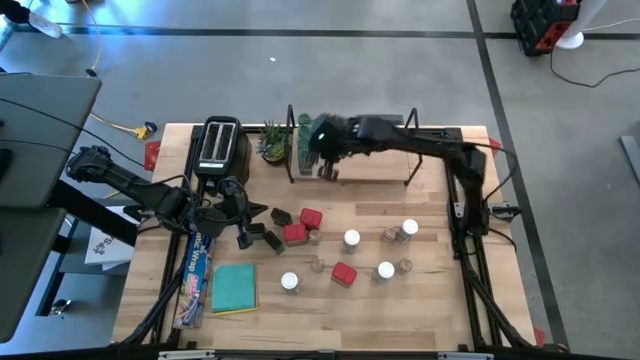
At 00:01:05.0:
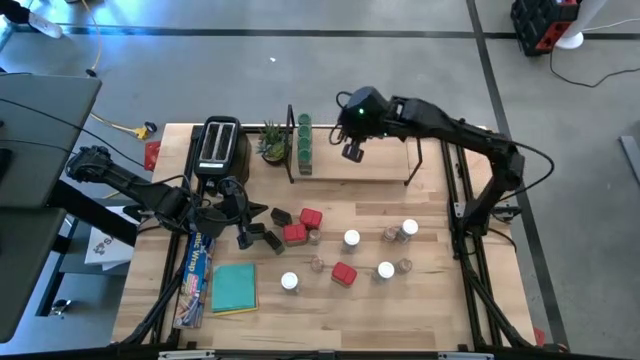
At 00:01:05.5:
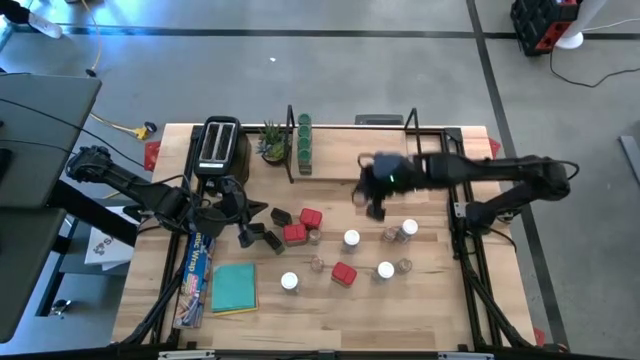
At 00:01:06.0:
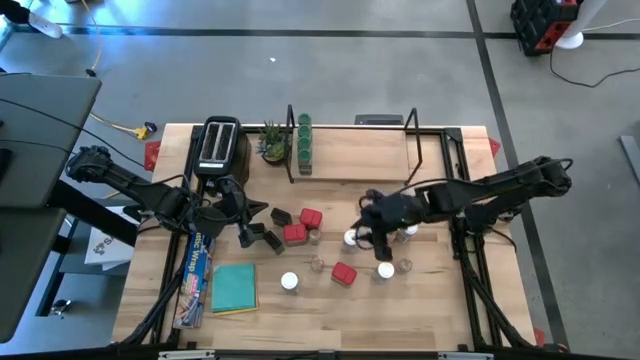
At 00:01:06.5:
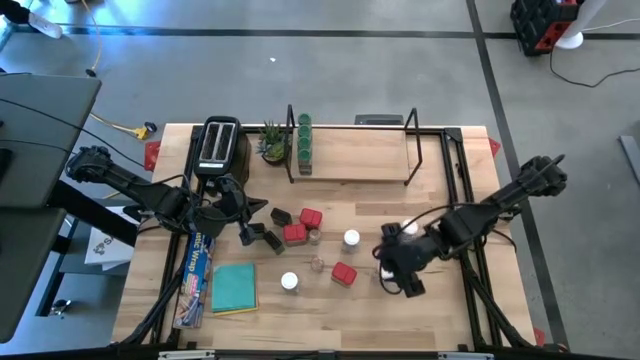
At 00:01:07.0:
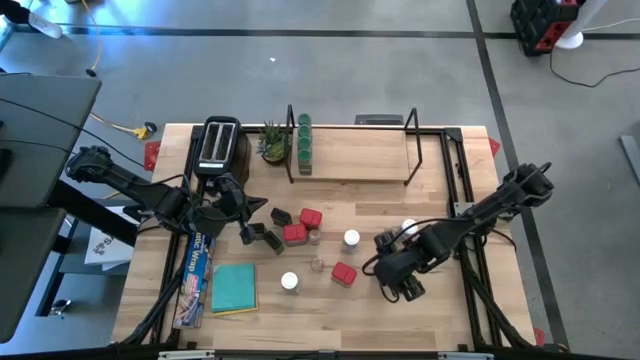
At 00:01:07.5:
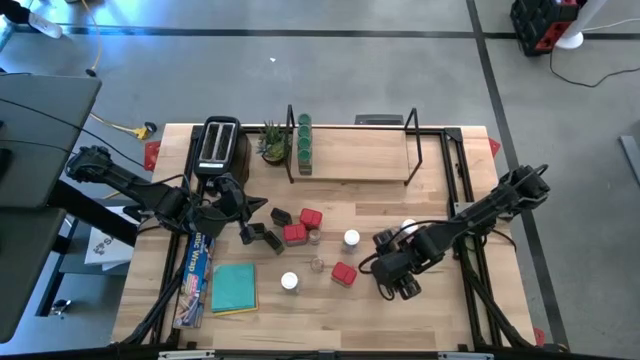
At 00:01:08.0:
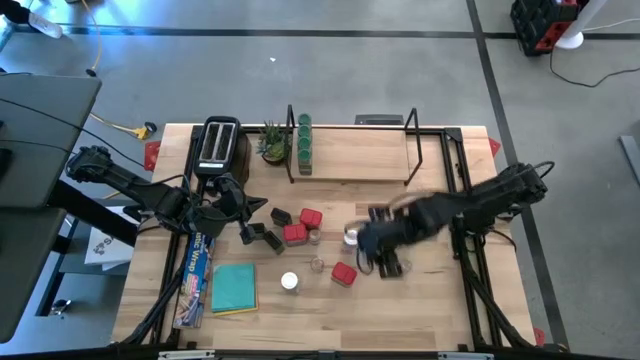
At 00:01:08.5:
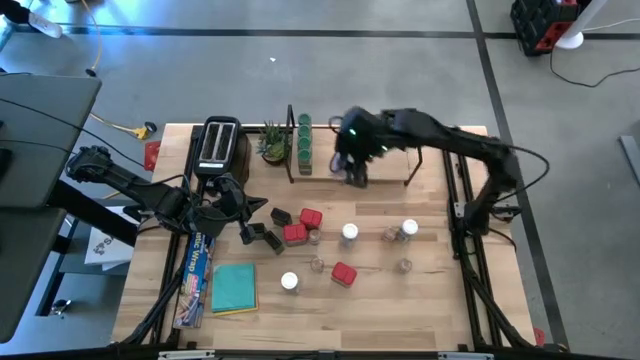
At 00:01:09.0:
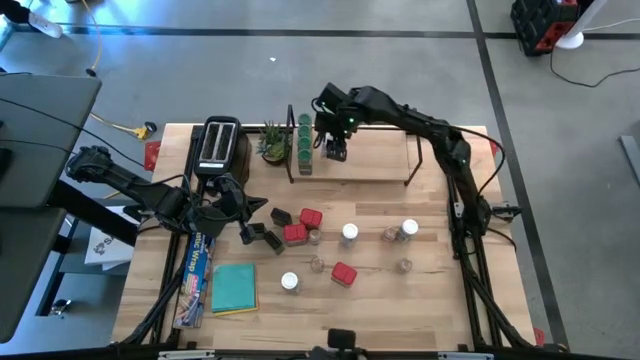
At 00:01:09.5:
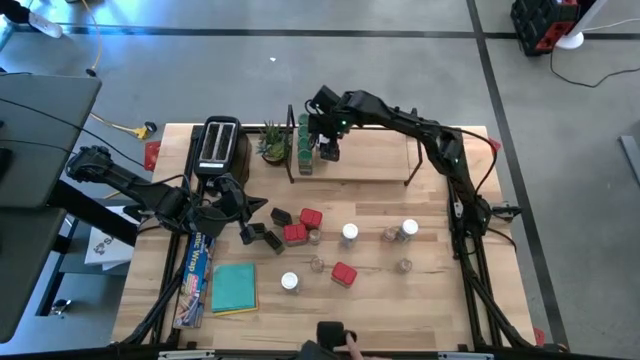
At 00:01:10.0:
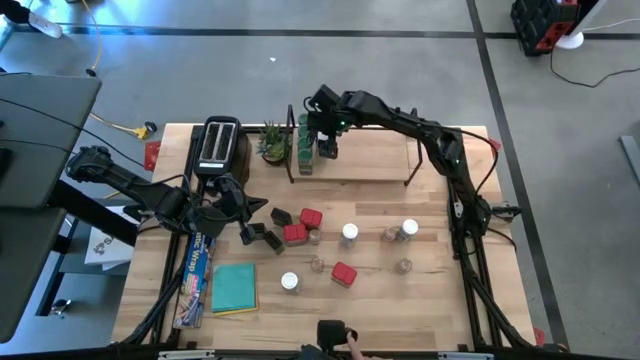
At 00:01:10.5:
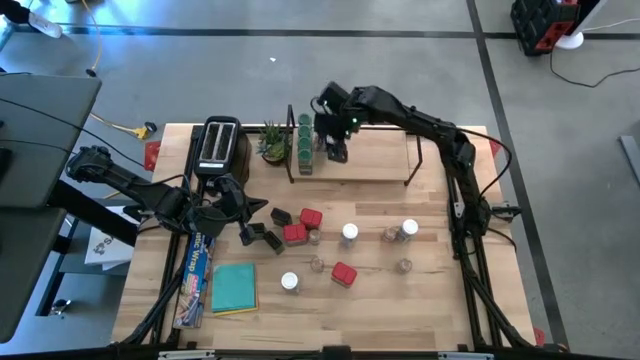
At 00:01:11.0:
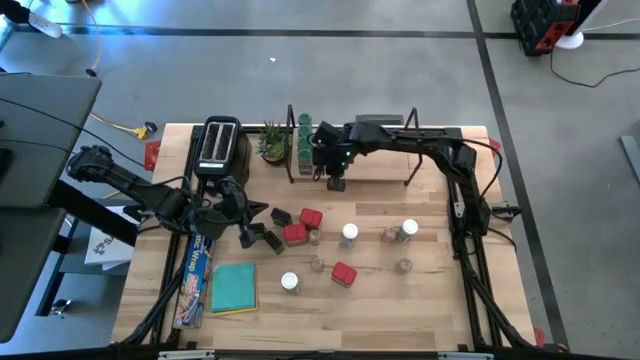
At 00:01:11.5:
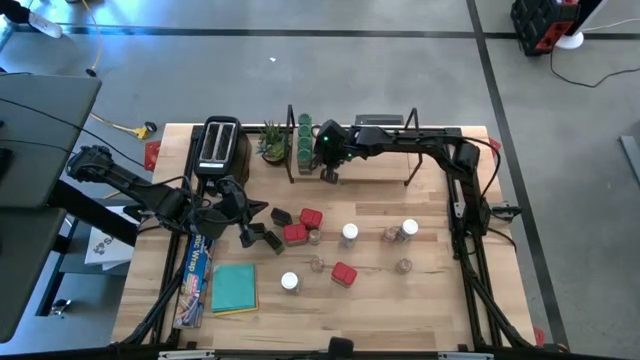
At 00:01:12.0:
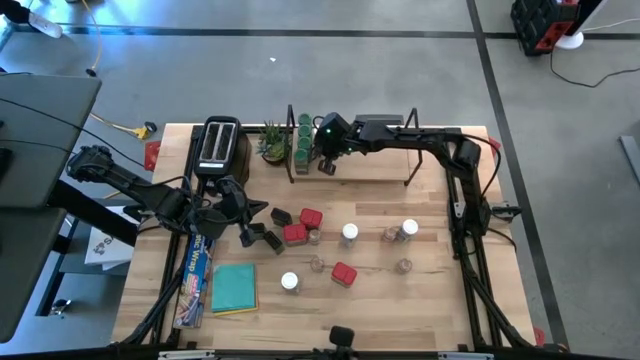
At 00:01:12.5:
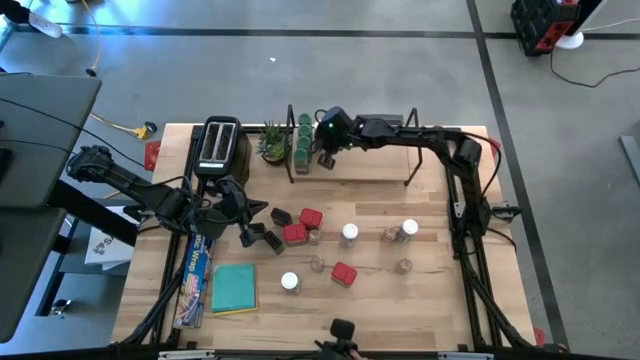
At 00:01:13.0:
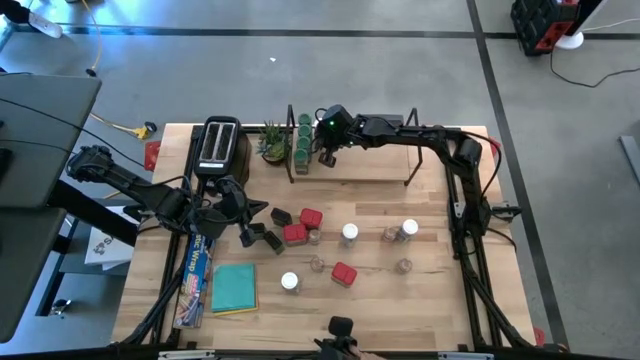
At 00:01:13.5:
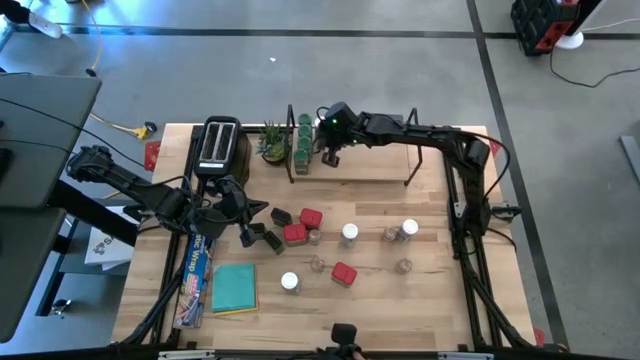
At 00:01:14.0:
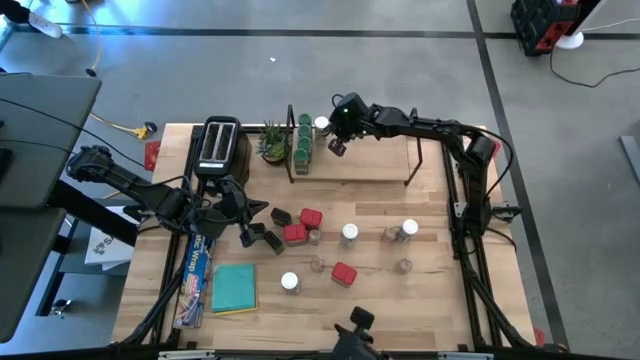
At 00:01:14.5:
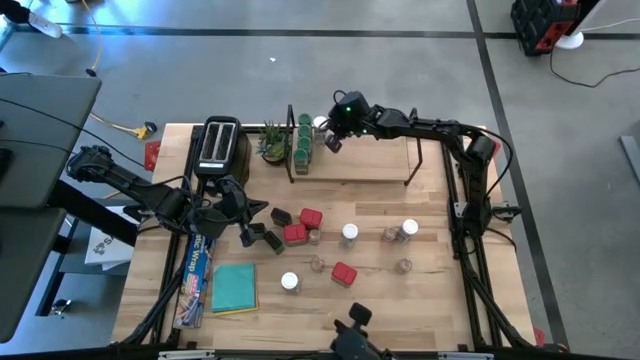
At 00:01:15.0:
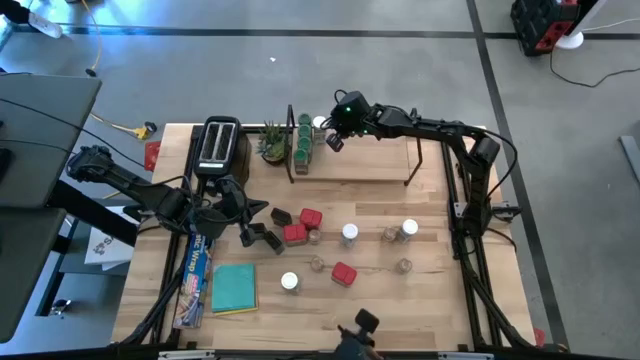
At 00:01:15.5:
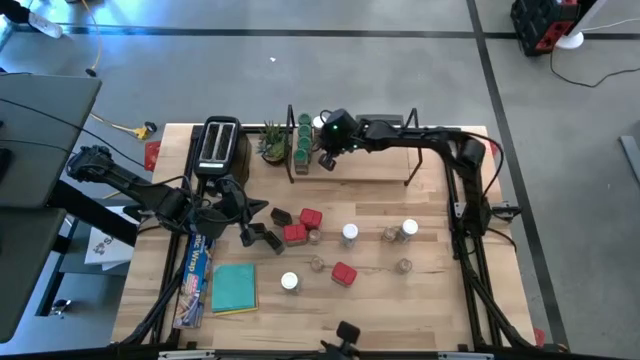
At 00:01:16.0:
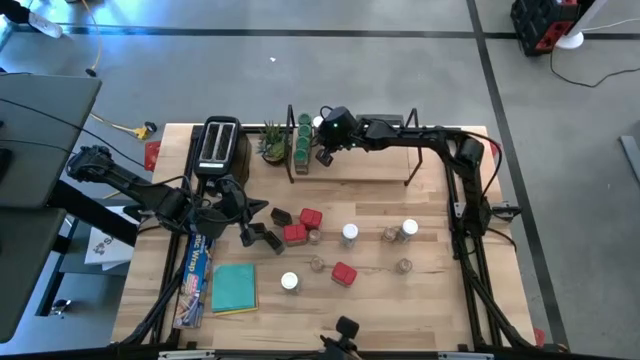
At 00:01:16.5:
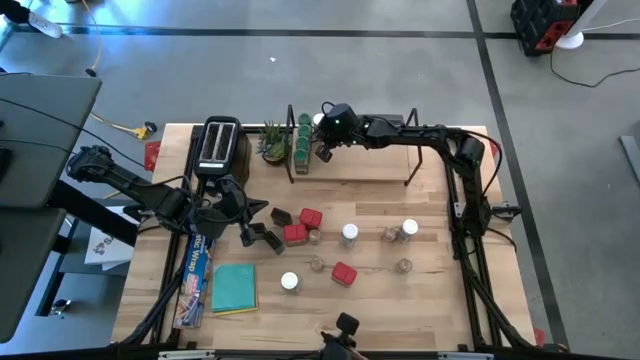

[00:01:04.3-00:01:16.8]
Task: Shelf spices
Put the bottom right white seasoning bottle on the shelf

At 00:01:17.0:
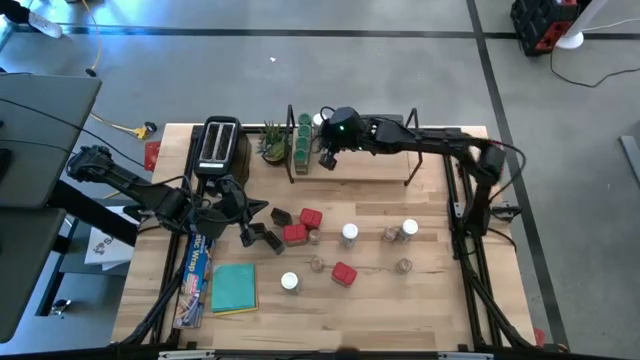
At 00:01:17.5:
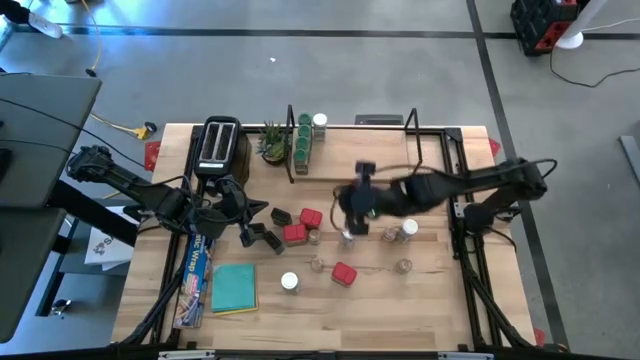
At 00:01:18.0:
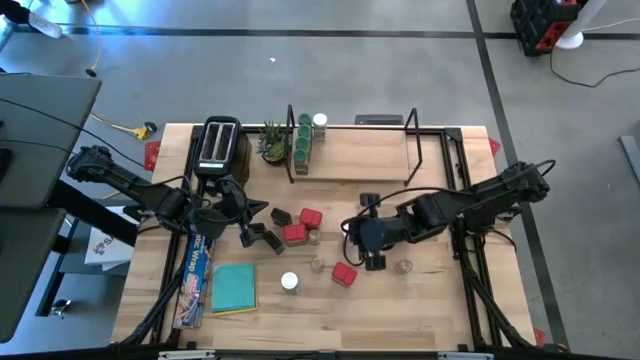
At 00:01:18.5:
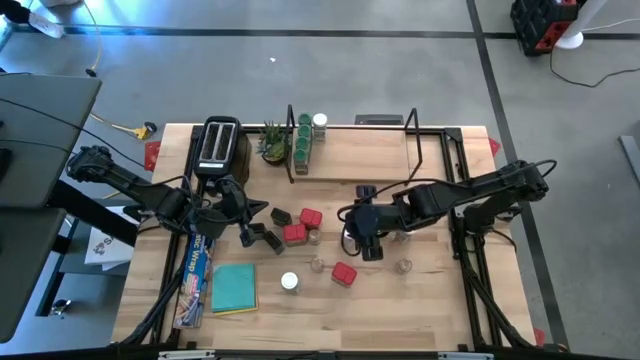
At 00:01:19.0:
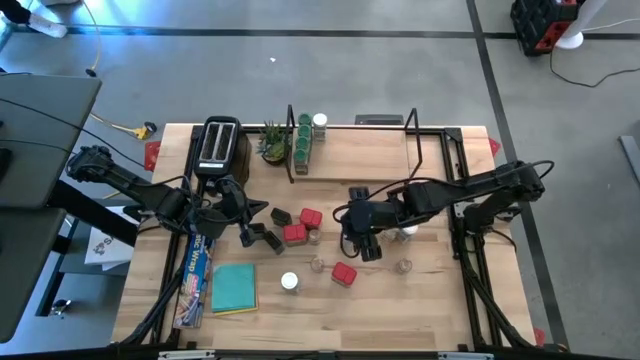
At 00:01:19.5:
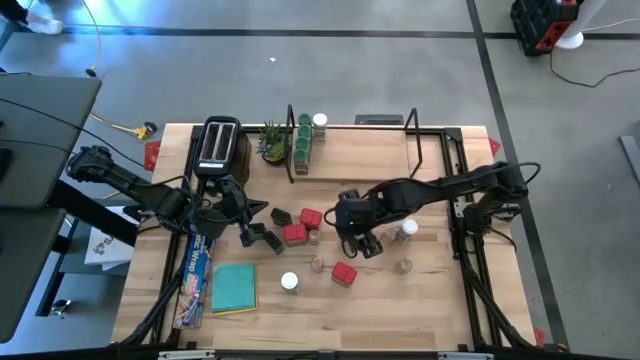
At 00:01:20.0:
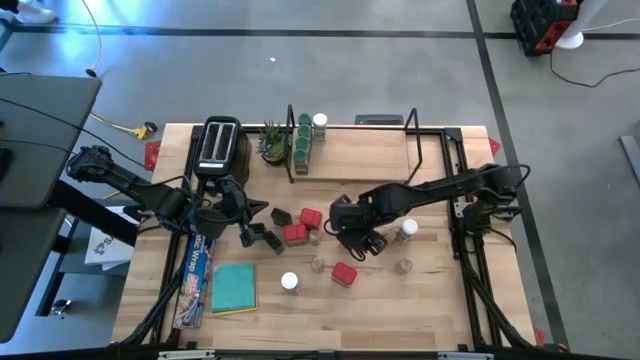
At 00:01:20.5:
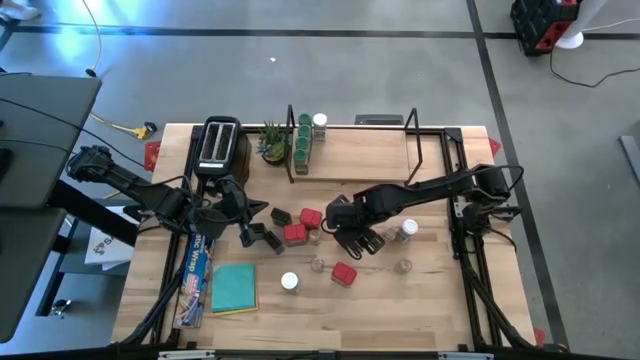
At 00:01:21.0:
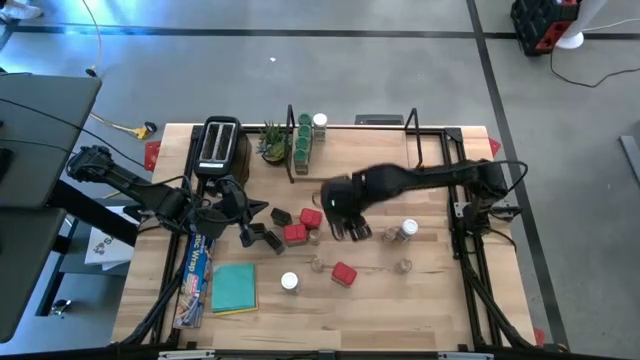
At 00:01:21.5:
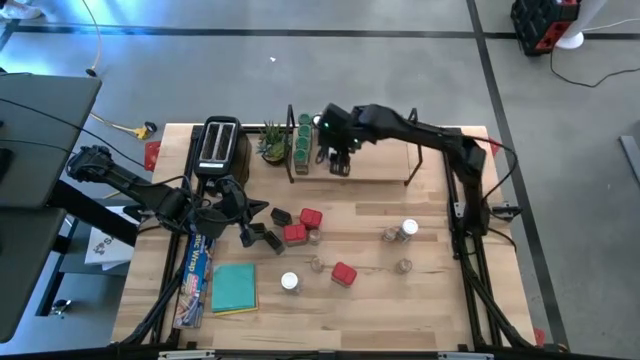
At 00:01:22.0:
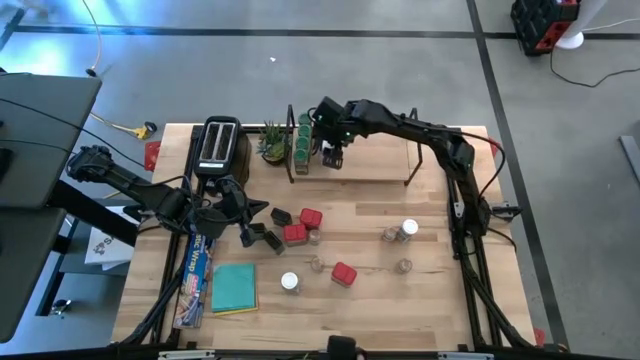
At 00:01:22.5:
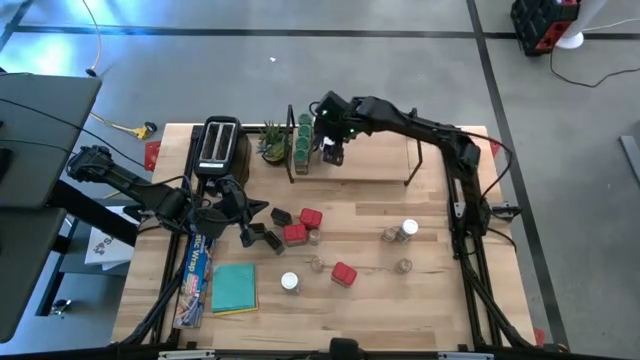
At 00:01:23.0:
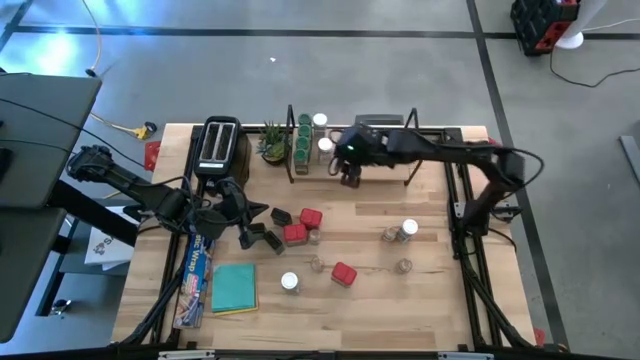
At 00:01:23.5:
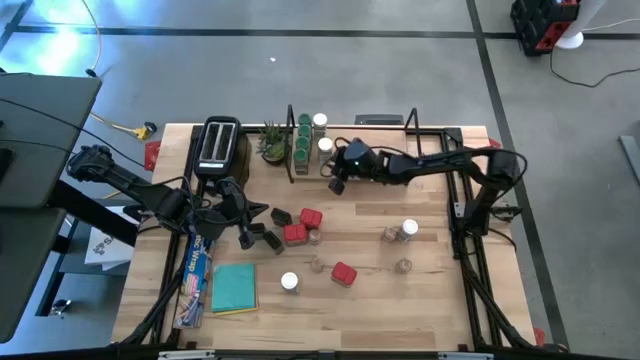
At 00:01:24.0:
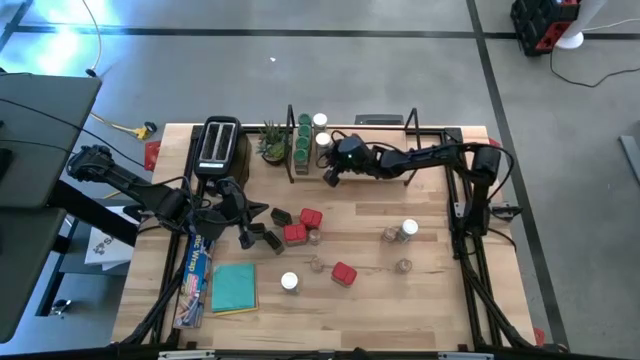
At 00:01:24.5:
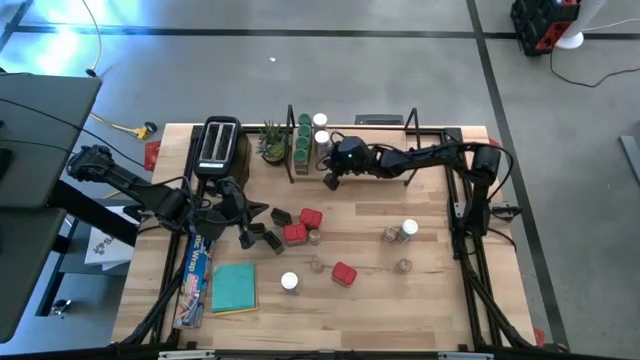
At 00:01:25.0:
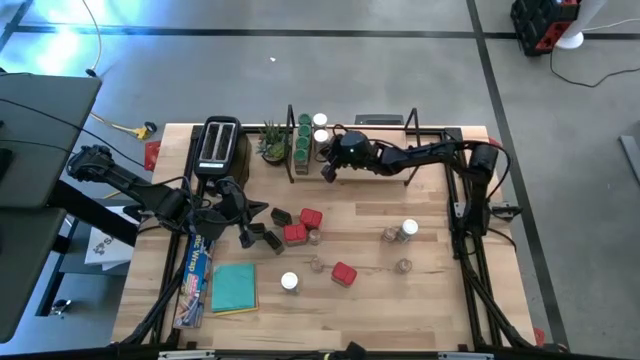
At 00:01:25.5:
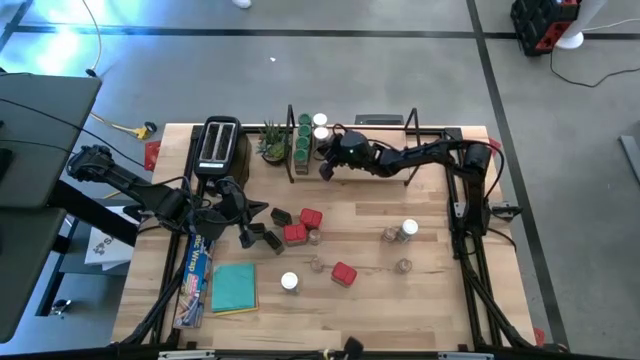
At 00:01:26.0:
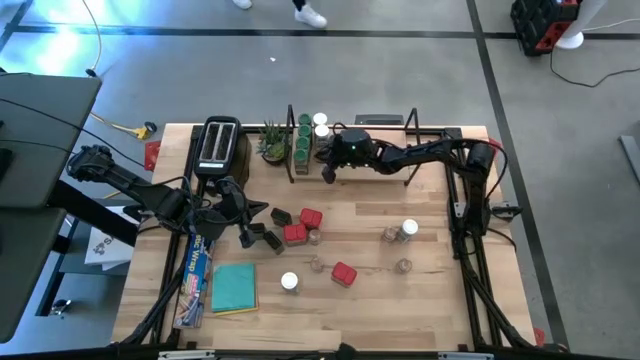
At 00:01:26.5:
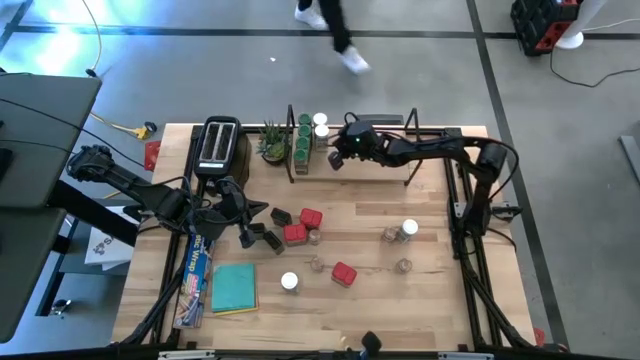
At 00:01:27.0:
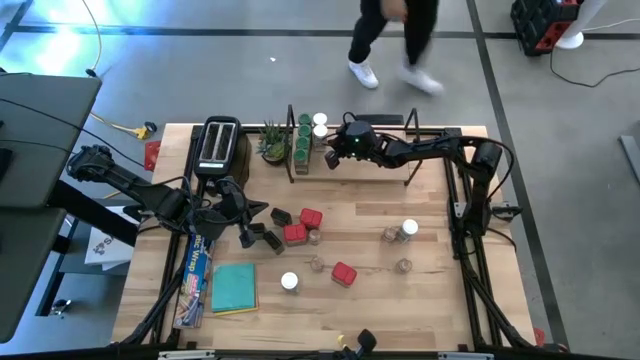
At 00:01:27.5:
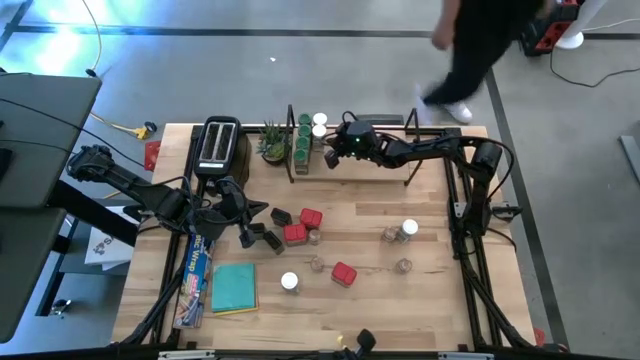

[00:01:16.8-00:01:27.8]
Put the top left white seasoning bottle on the shelf aligned with the other white seasoning bottle
